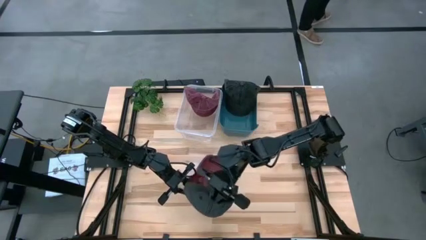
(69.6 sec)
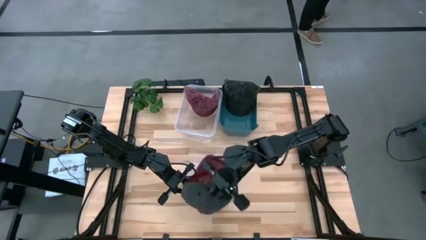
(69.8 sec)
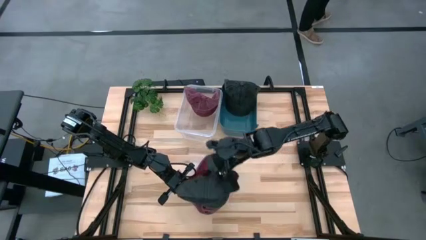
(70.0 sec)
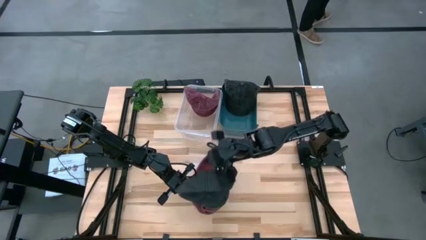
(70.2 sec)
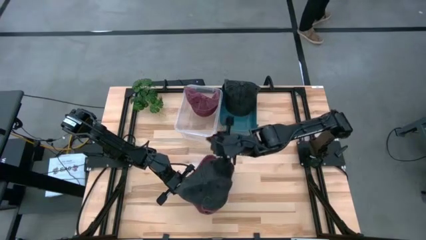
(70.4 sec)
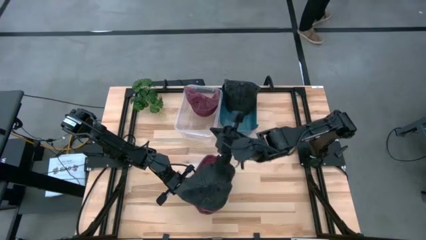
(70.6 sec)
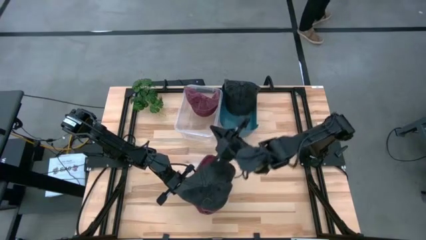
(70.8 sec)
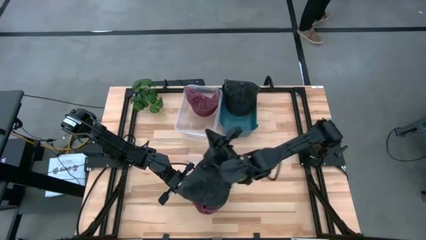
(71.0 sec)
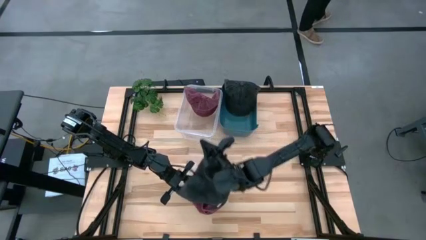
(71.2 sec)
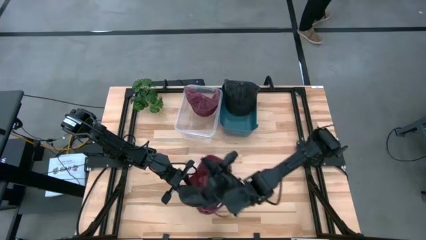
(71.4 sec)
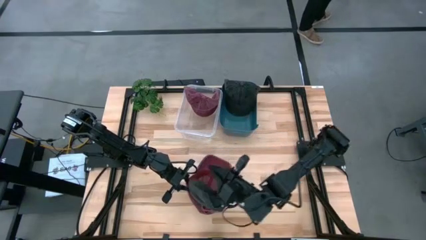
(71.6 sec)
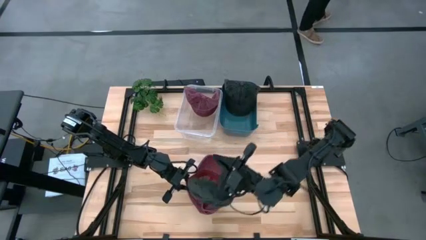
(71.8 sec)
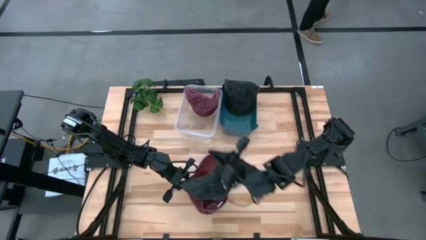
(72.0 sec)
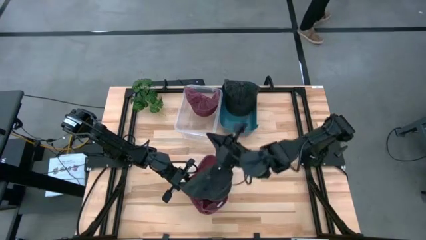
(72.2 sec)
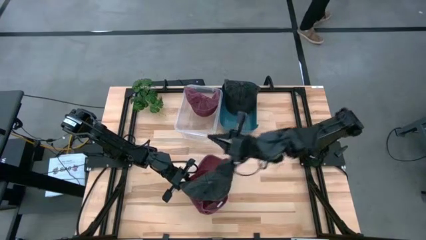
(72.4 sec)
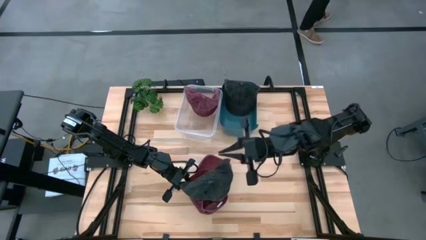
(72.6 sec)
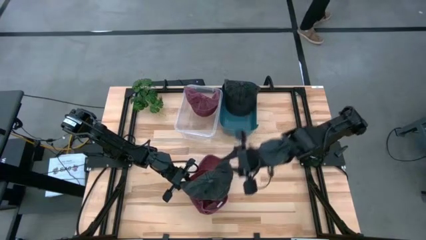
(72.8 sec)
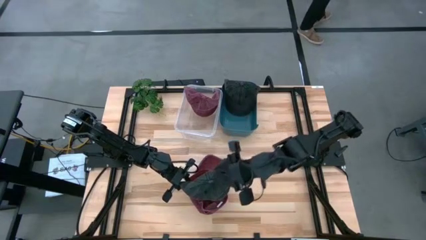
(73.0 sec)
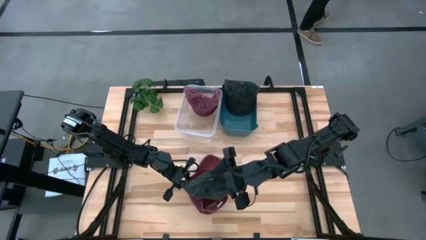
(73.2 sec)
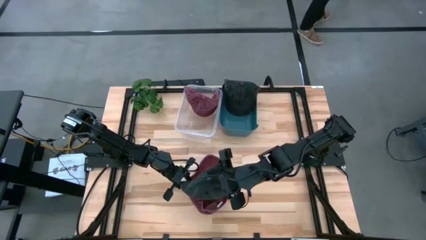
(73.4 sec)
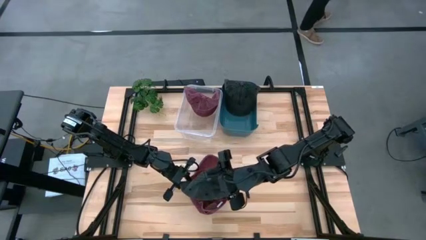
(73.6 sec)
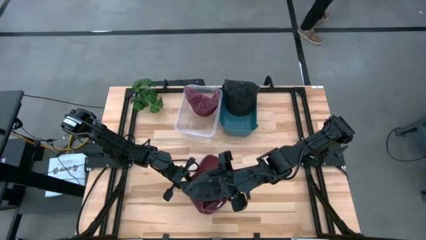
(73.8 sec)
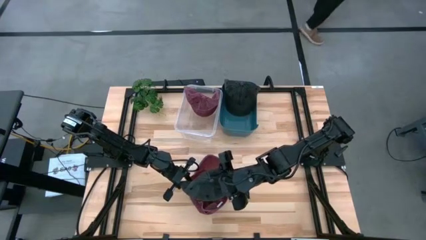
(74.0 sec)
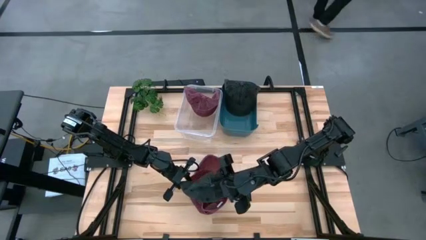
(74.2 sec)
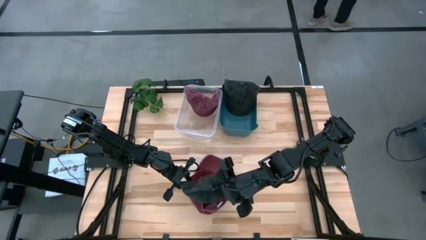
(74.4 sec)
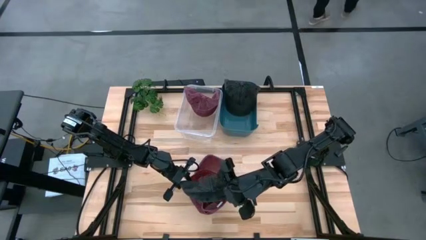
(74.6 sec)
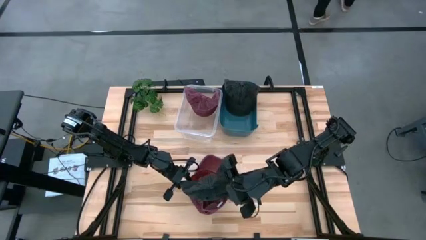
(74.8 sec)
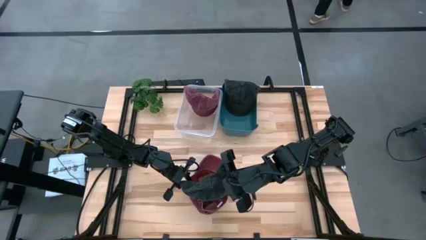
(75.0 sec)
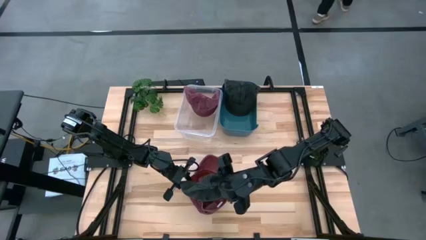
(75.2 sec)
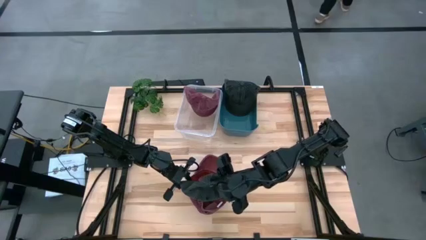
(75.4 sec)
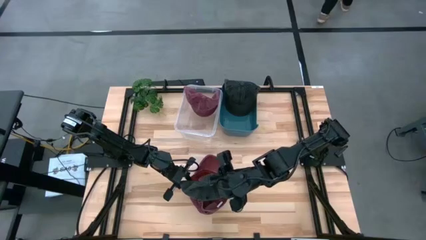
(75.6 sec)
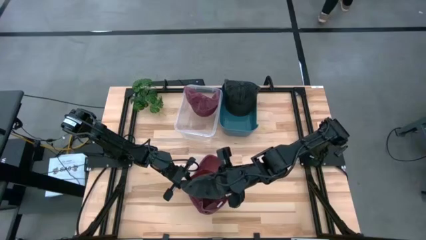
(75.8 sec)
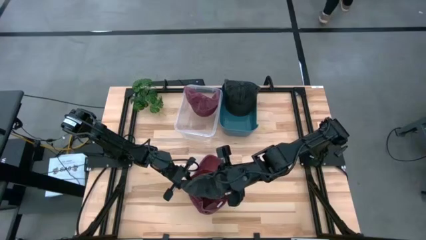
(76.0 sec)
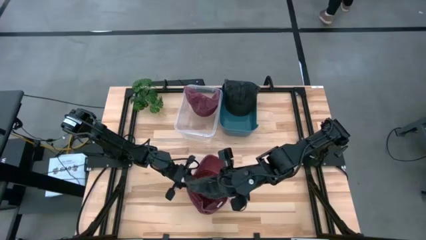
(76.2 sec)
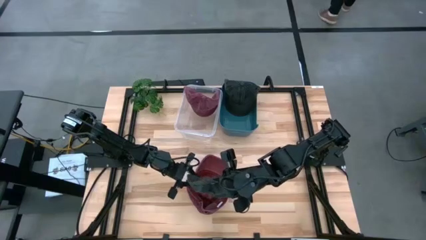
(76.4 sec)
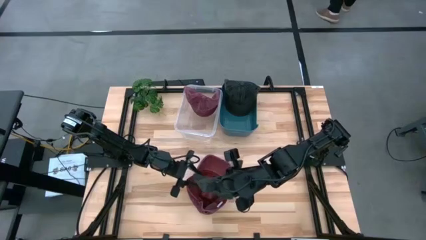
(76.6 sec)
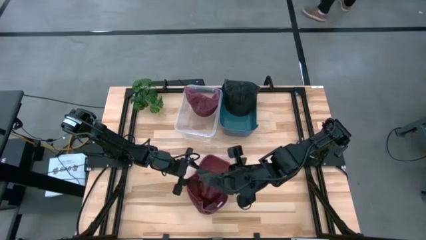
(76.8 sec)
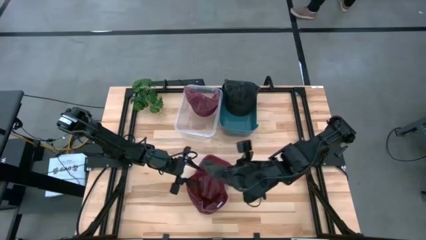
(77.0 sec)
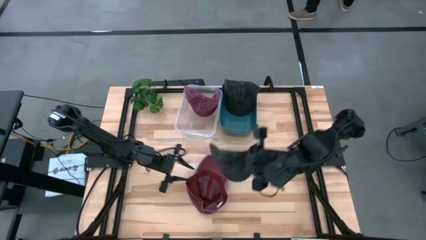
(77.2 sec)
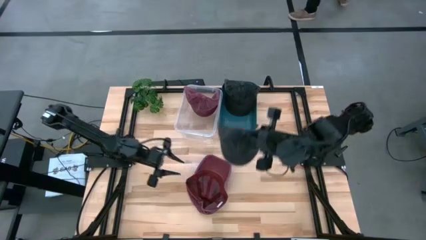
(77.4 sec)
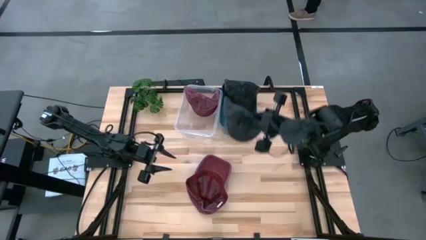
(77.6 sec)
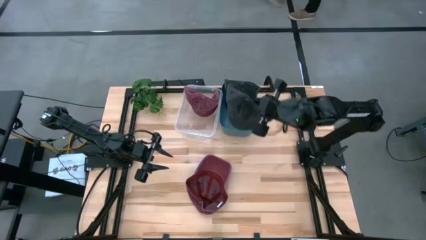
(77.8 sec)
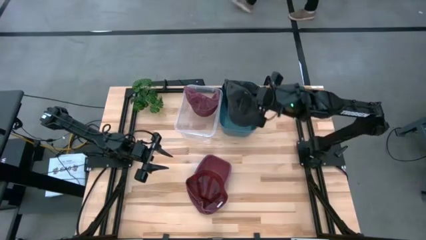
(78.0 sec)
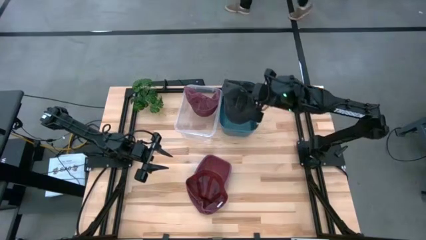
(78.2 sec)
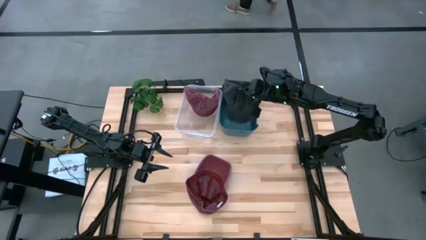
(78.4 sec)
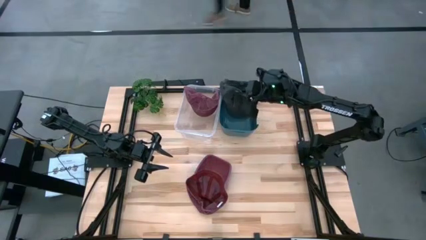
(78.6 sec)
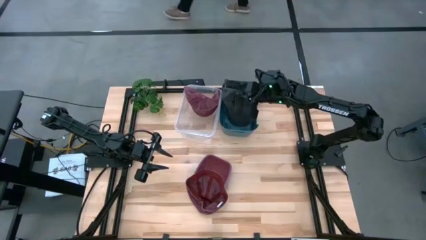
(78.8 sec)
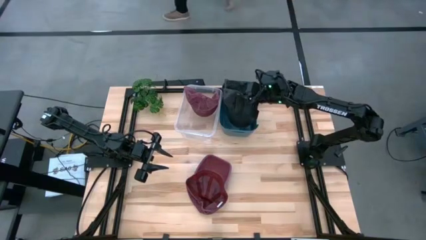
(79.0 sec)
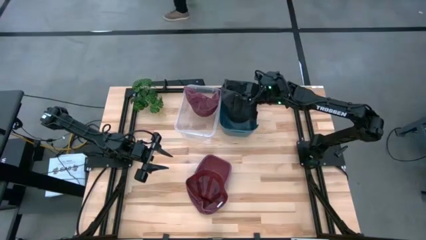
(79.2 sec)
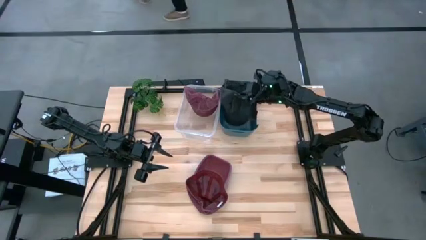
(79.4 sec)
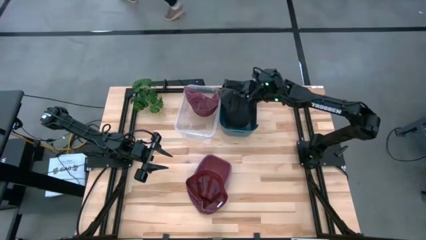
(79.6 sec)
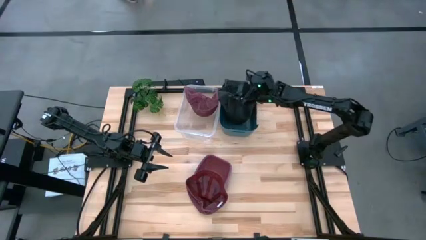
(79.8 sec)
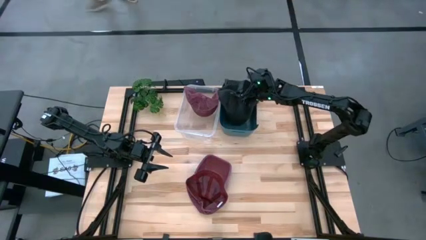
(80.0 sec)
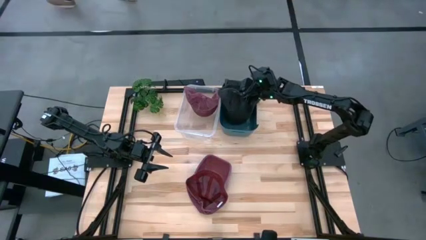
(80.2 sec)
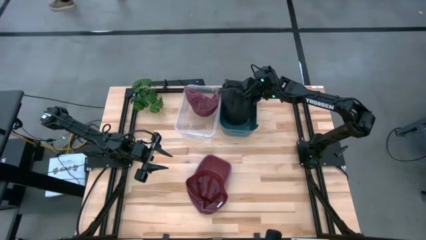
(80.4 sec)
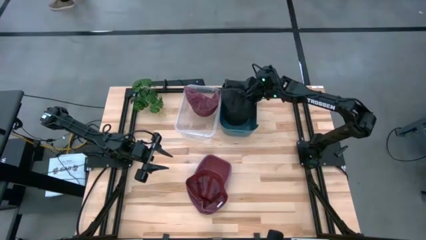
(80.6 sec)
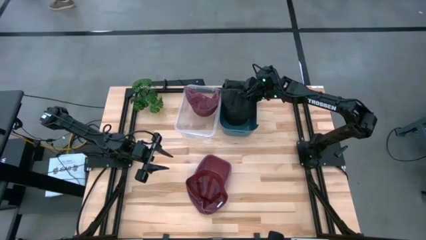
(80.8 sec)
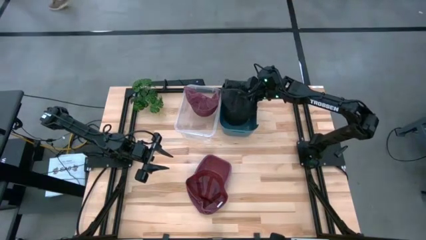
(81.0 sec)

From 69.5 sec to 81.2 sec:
Task: Pick & Place hat
Put the black cap into the blue bin

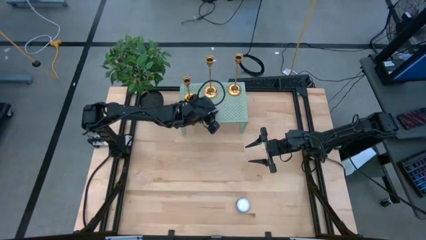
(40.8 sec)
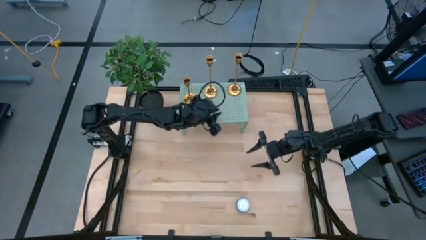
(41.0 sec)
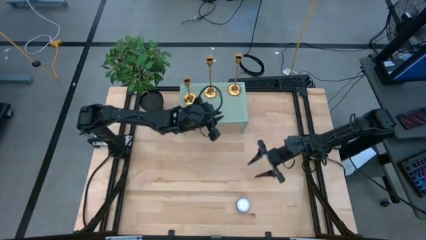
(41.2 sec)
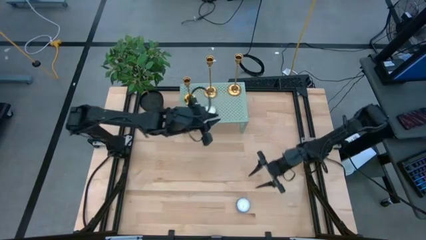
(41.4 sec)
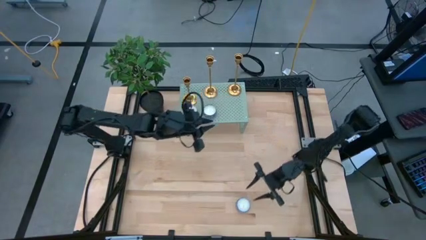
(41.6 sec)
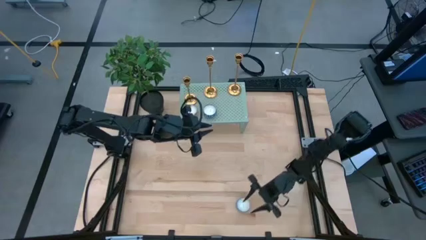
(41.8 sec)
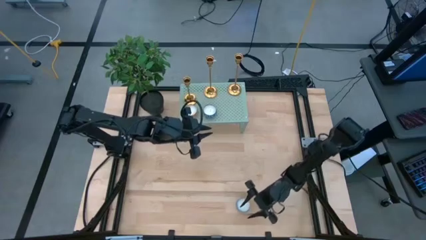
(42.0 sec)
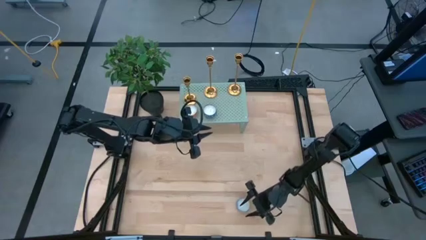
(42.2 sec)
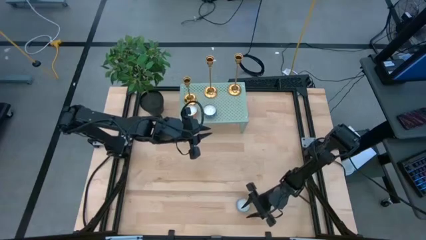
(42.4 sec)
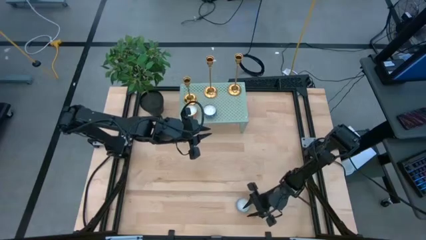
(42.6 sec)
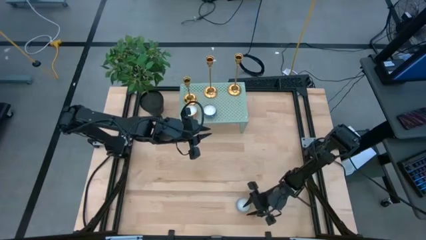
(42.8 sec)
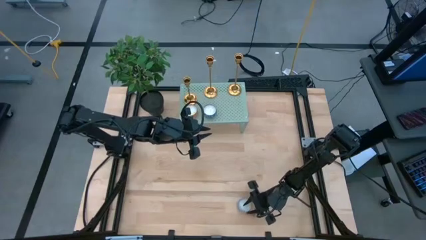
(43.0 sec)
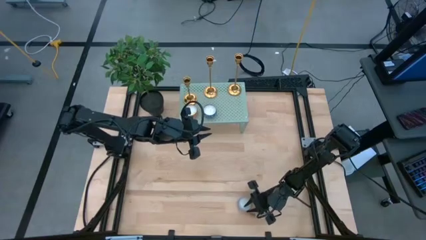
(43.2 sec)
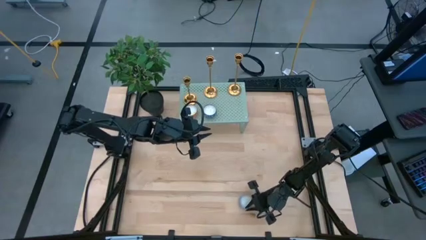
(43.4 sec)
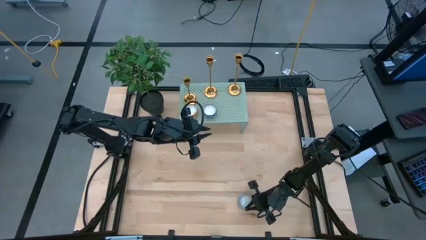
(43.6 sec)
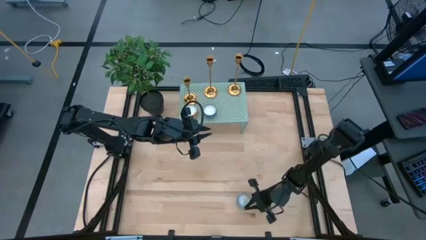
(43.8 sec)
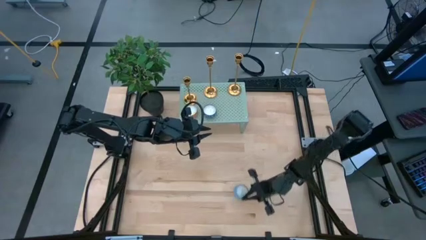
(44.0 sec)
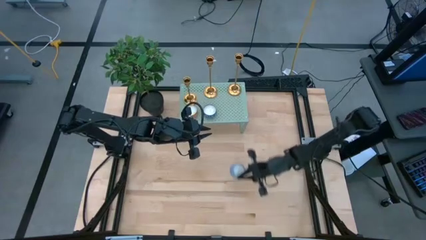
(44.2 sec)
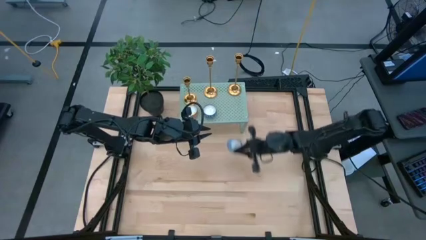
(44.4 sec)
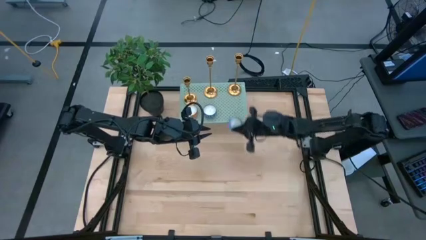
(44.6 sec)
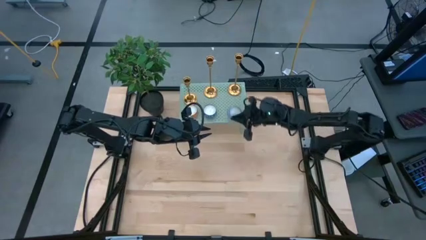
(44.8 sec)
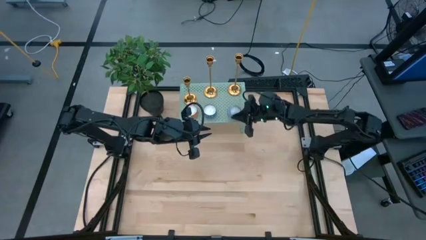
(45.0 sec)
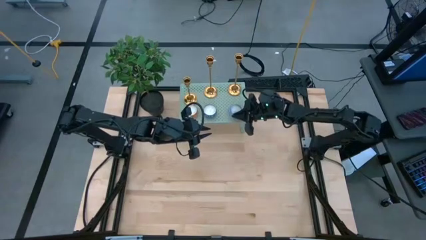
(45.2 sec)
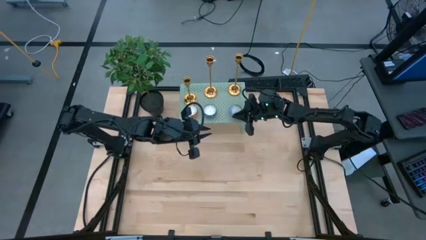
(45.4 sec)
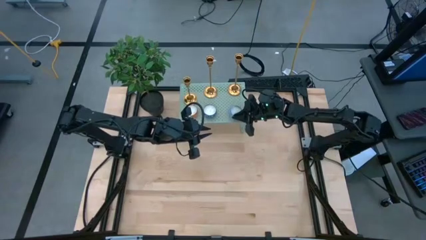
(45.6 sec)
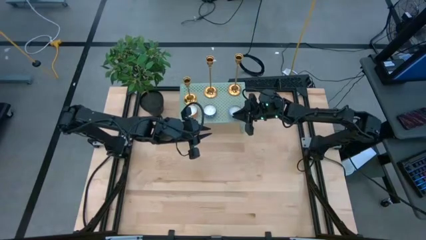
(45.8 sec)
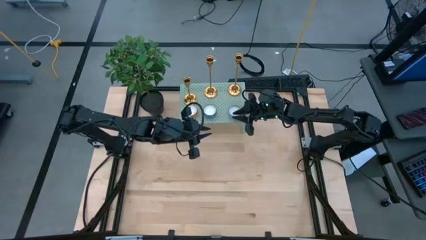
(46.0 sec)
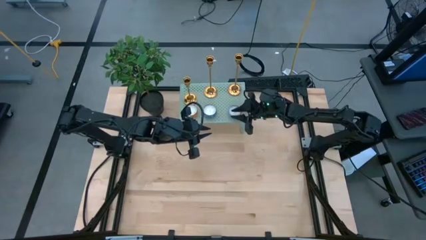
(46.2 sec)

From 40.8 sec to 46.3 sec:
Task: Pick & Place candle stick holders
Put the blue scented candle on the shelf
